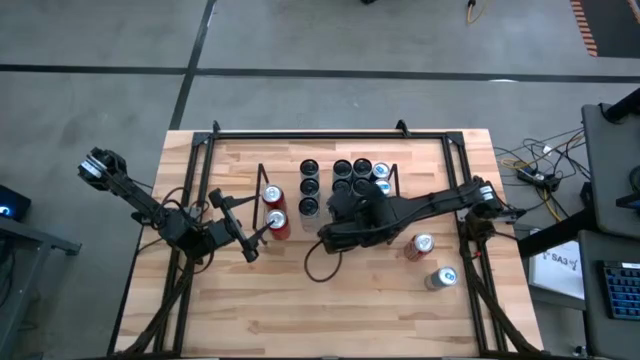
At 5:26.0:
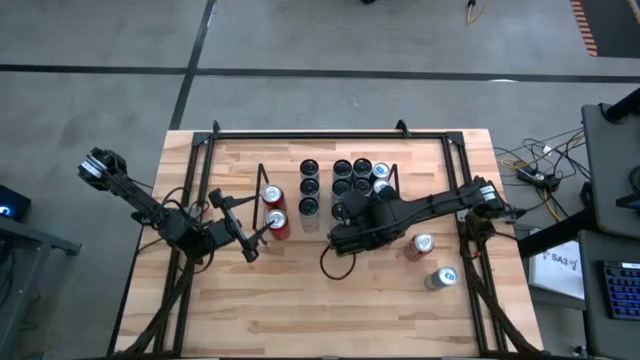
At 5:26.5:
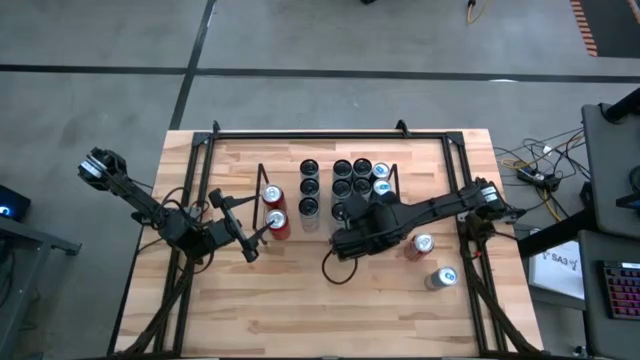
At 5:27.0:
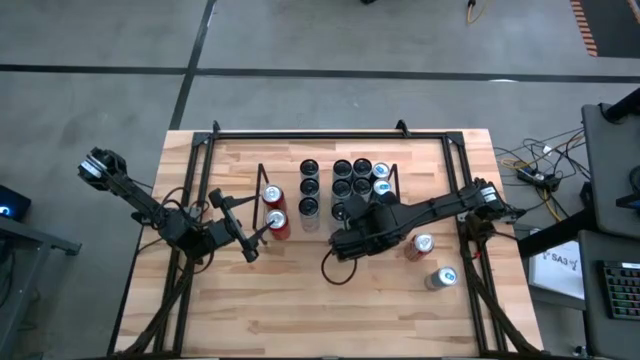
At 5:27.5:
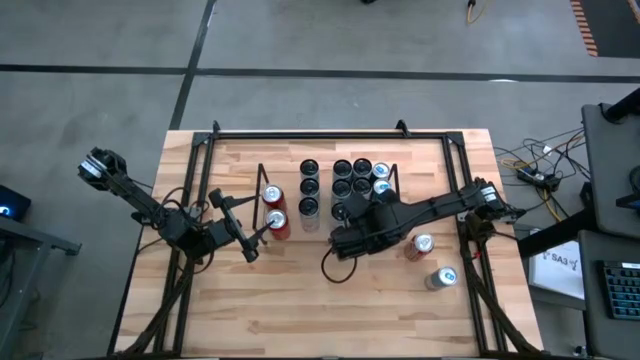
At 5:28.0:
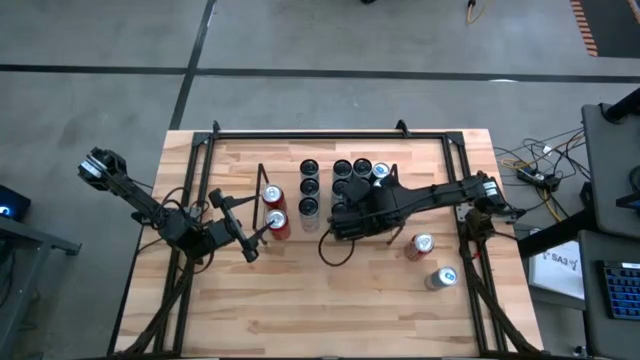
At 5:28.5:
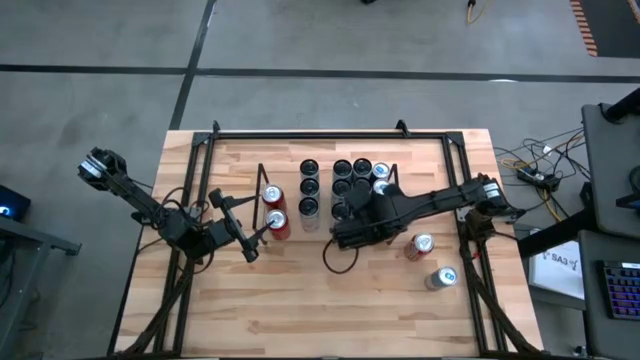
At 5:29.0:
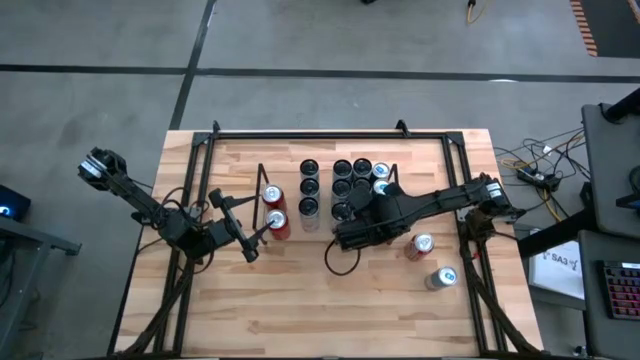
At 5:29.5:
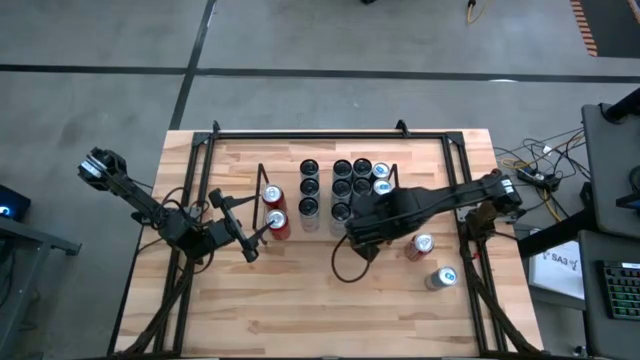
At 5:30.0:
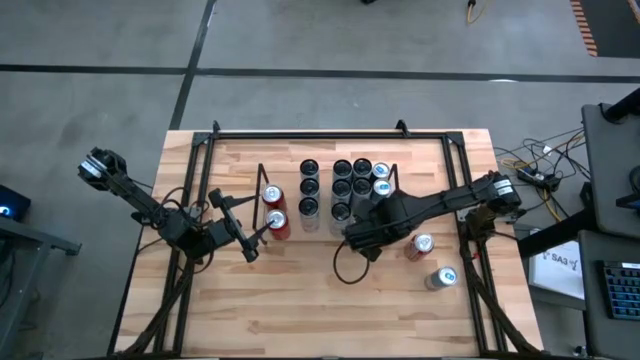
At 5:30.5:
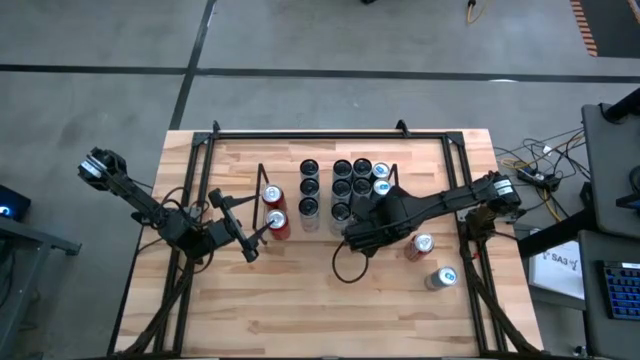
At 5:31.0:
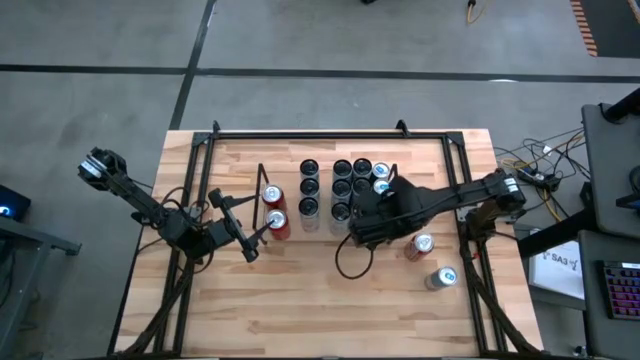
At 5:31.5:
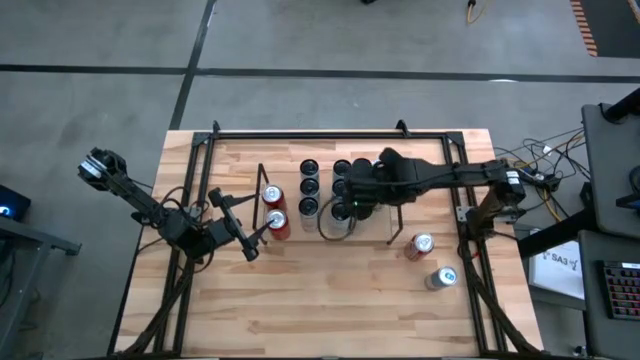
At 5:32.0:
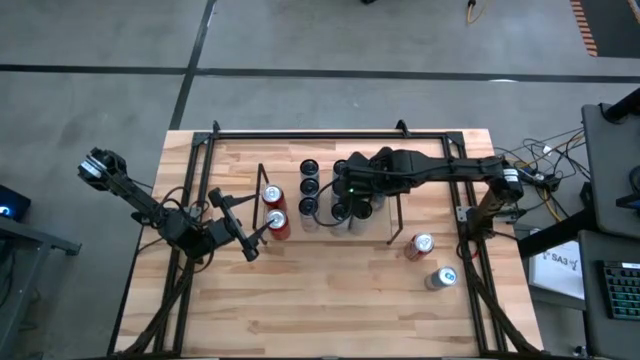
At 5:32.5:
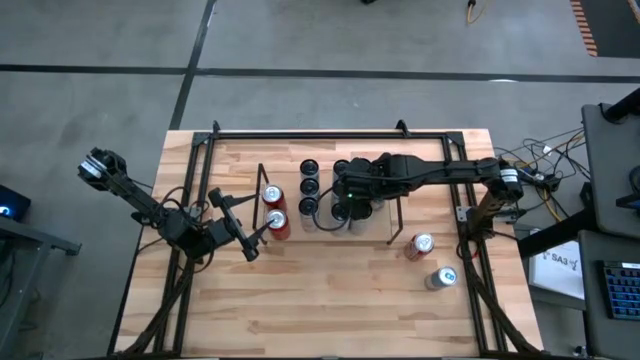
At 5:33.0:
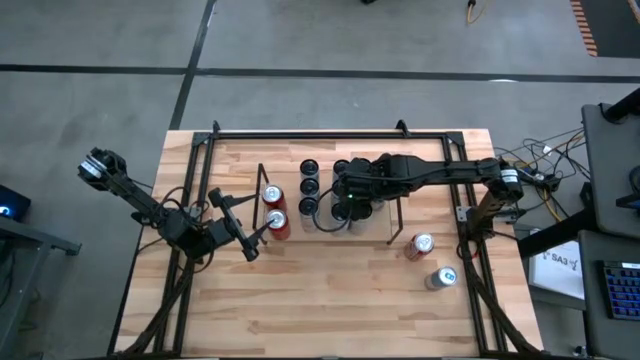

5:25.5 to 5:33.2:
Task: Place canned beverage on shelf
Adjust the white and yellow soda cans

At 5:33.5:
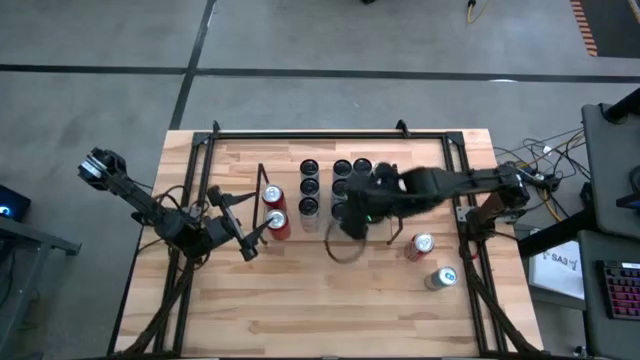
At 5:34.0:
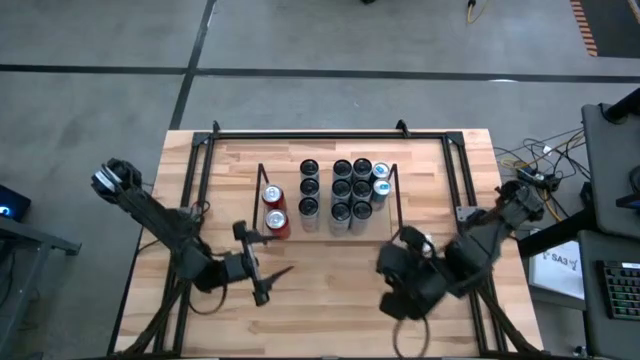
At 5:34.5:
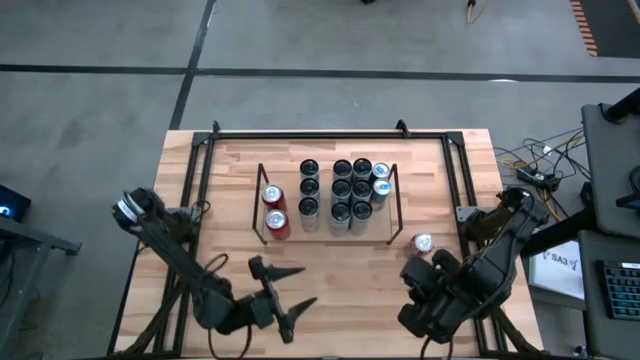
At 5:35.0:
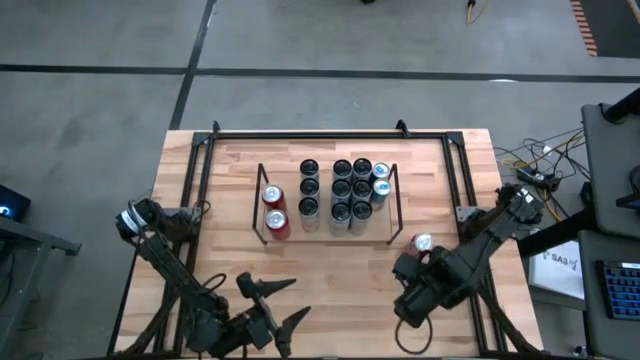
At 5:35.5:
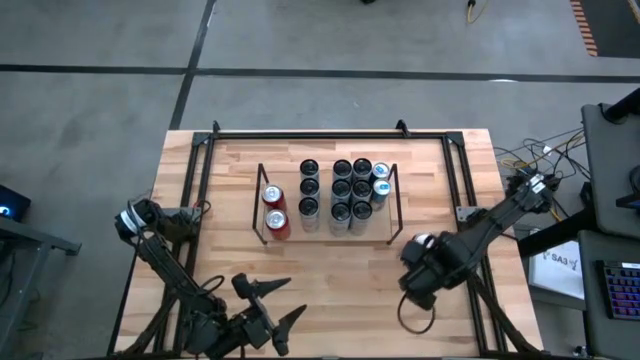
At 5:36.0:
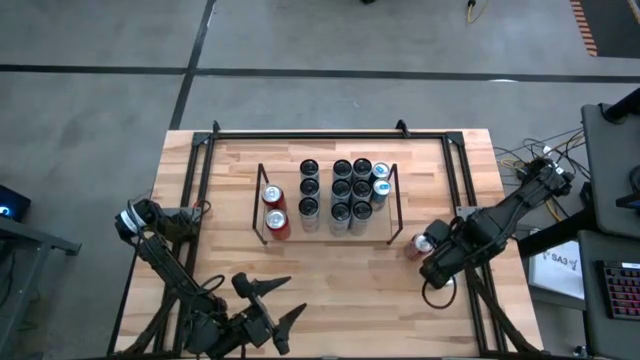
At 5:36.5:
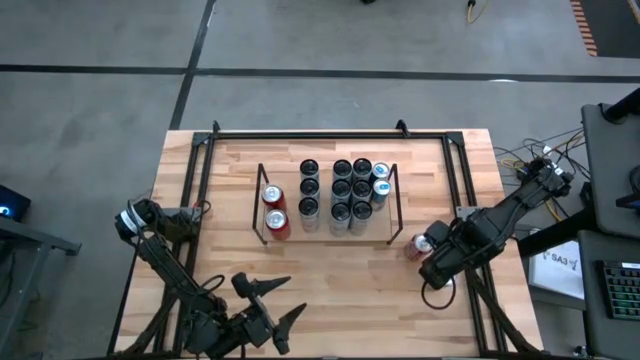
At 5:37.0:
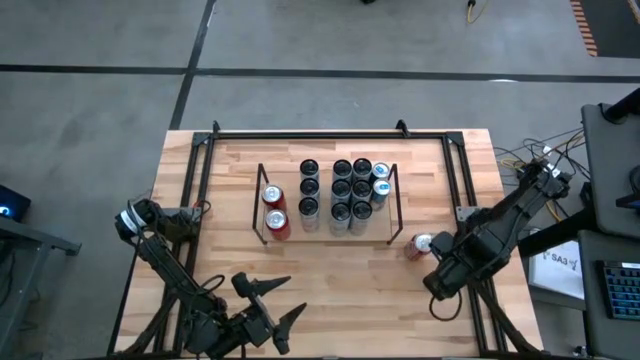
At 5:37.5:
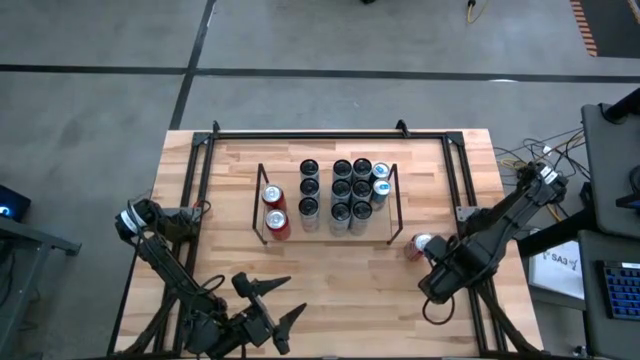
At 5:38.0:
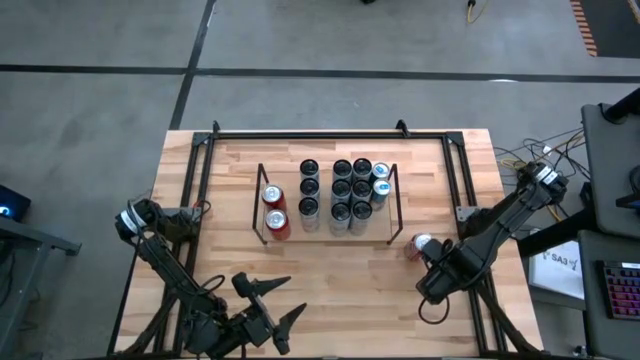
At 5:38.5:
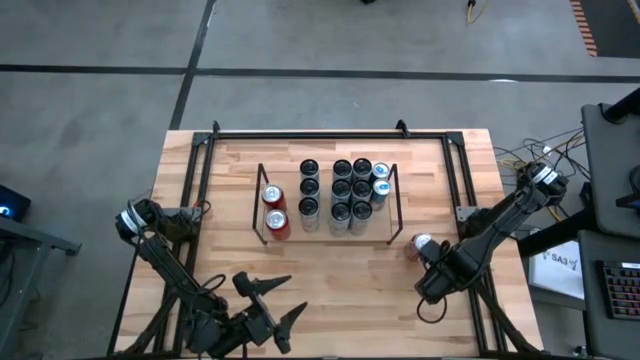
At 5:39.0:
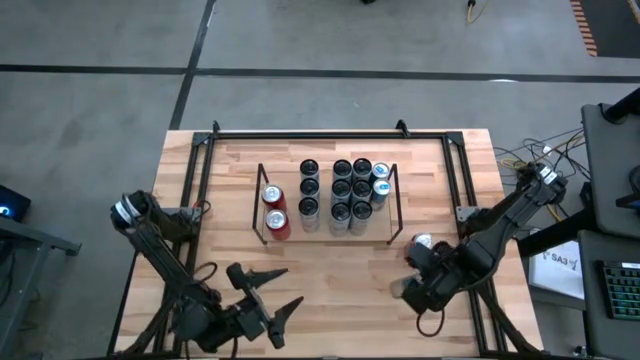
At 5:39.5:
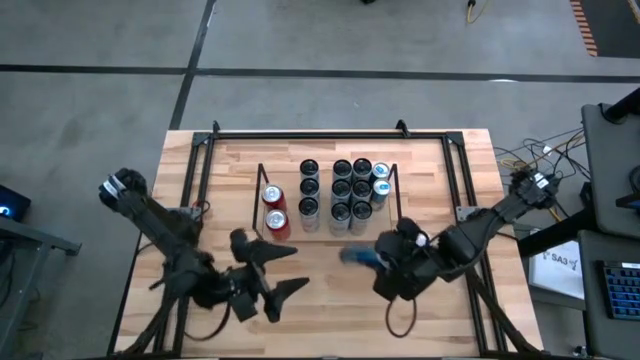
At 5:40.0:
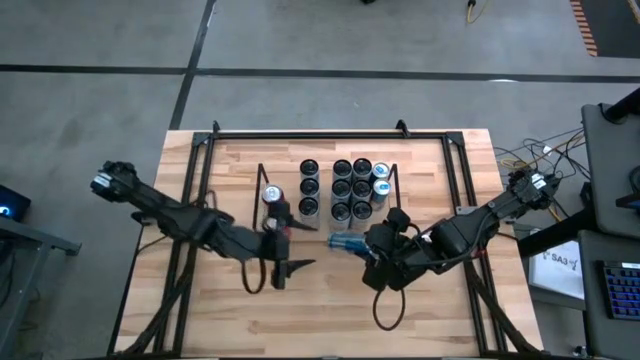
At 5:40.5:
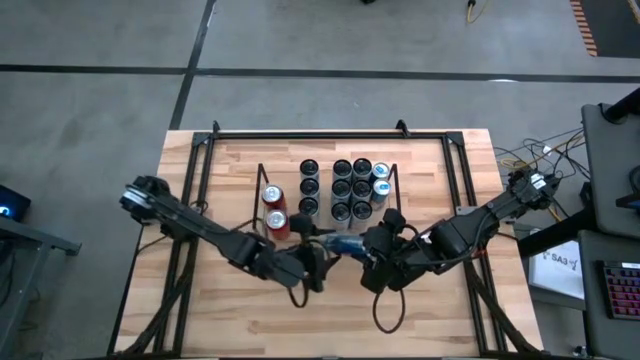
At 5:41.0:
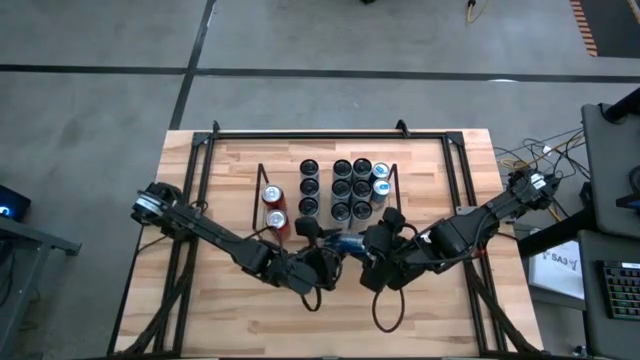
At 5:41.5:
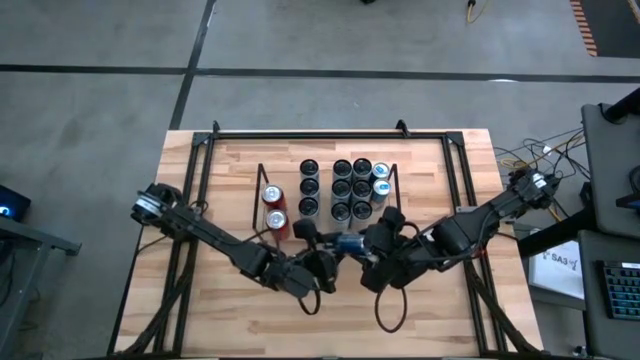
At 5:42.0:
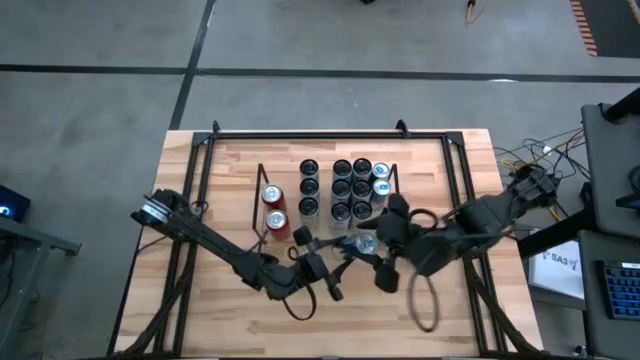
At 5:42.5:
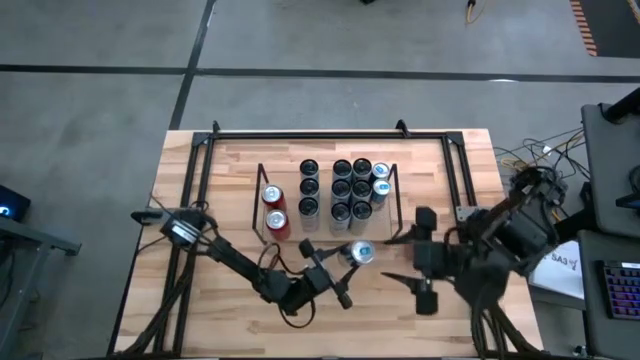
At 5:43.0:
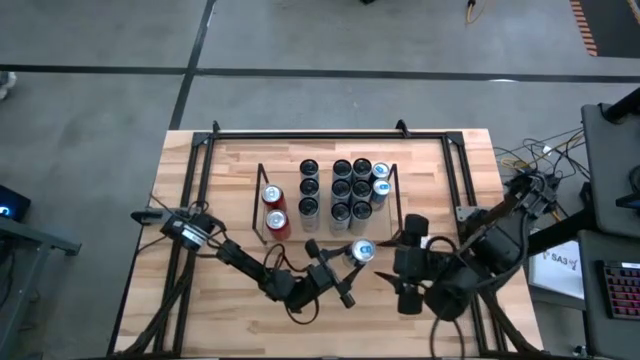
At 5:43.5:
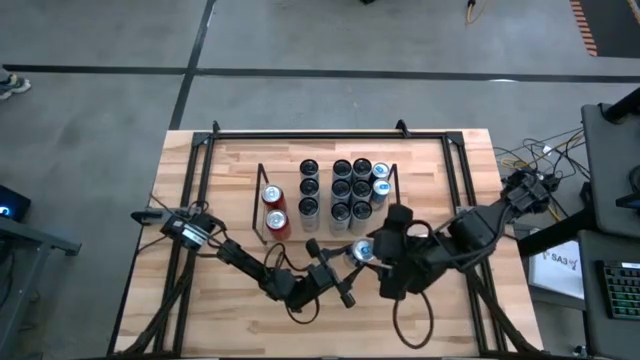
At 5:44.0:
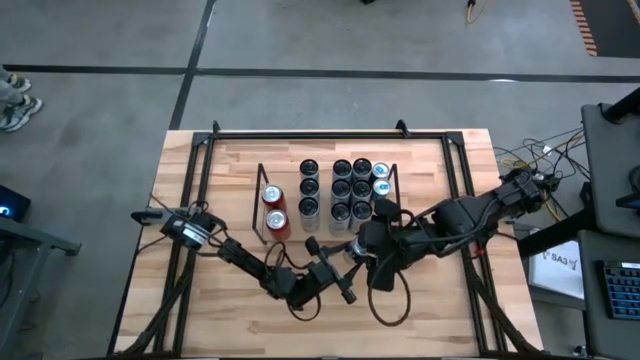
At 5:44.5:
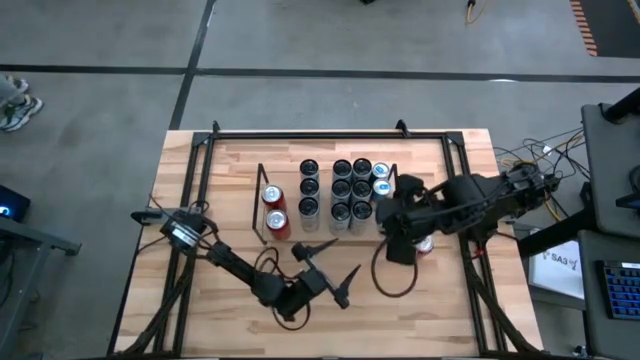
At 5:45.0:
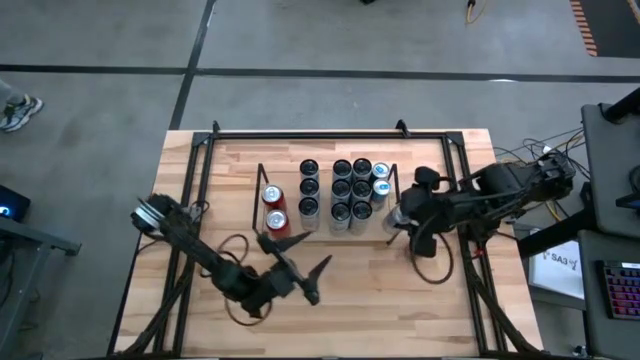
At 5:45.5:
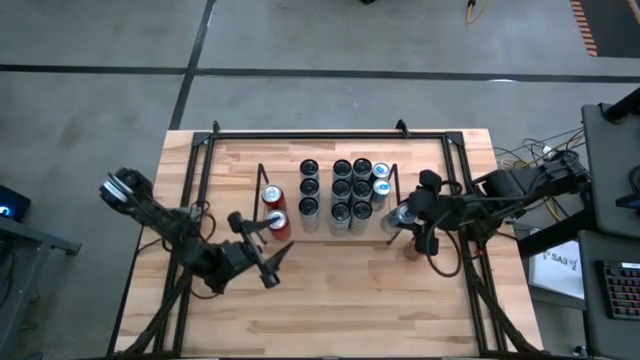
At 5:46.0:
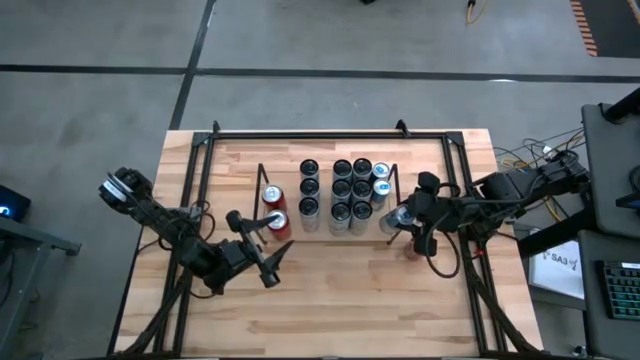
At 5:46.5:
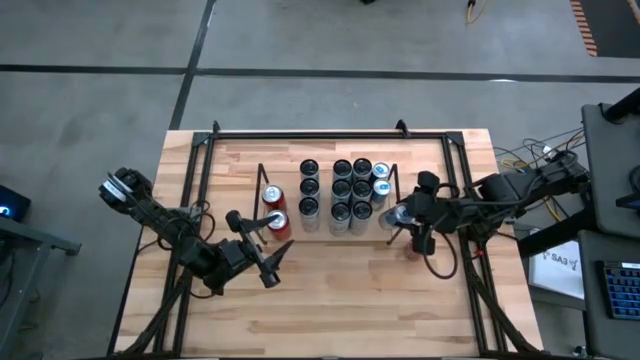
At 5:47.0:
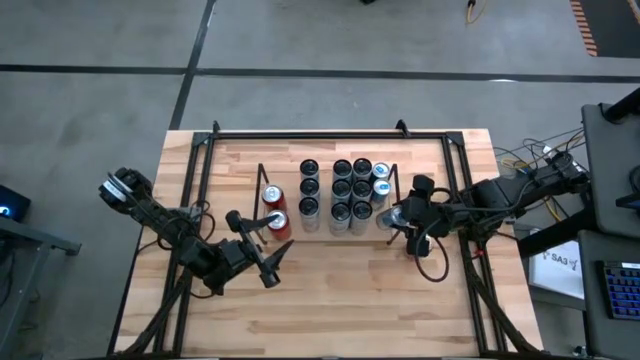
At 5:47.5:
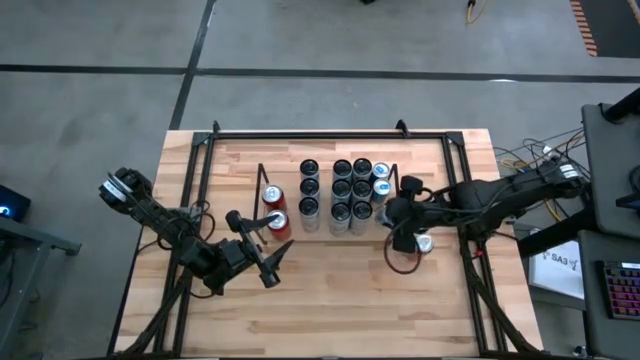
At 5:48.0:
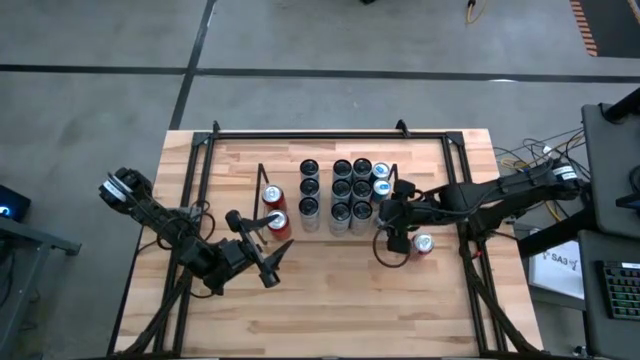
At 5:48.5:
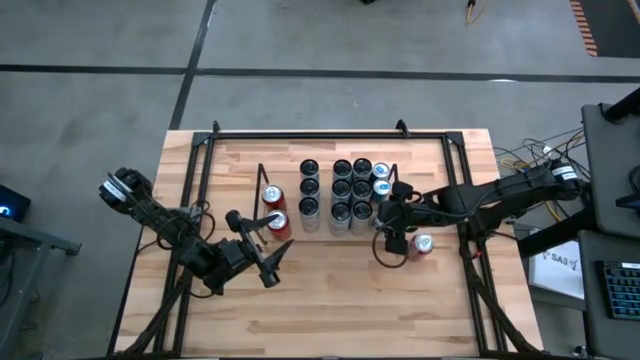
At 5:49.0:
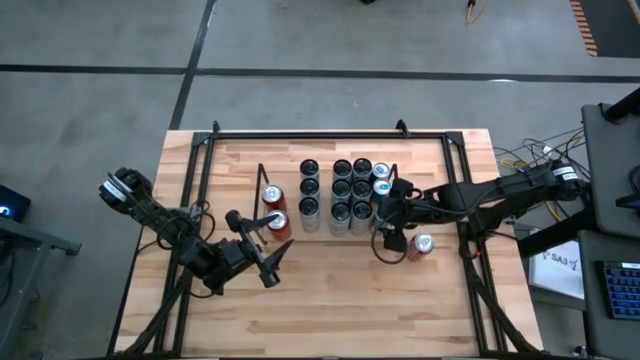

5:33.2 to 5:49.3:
Put the blue soda can on the shelf aligned with the other blue soda can
